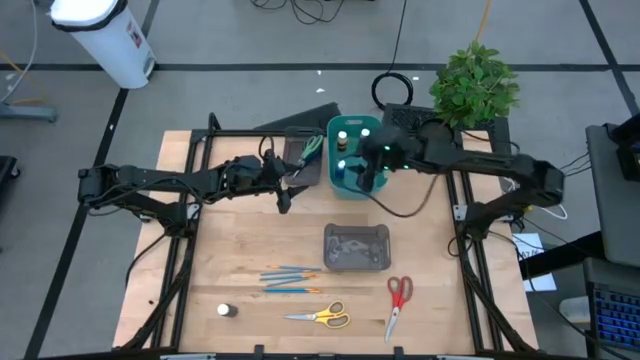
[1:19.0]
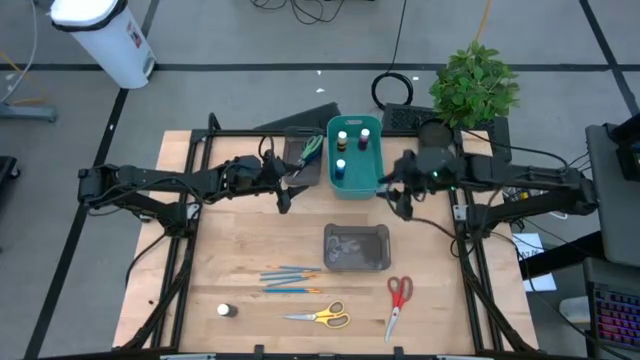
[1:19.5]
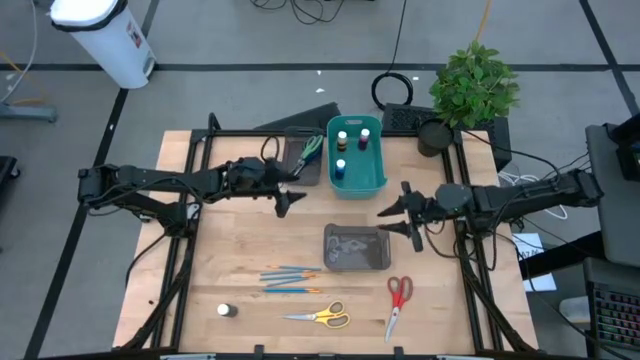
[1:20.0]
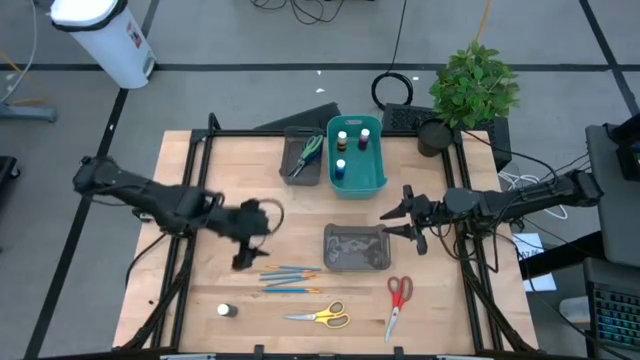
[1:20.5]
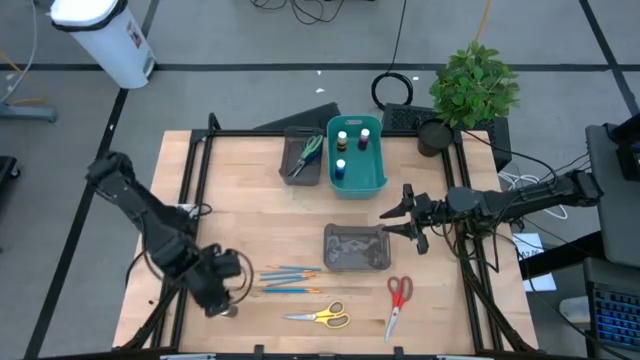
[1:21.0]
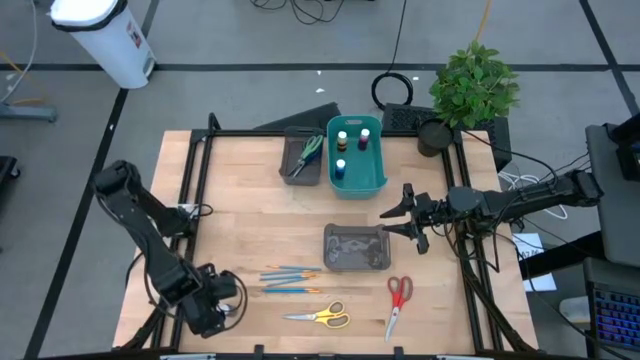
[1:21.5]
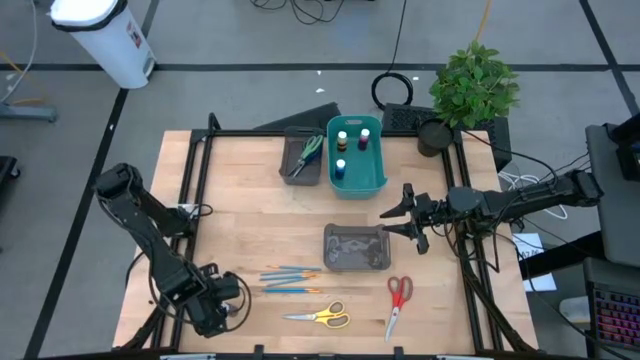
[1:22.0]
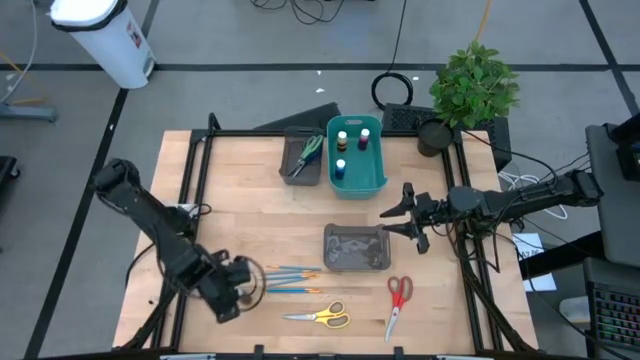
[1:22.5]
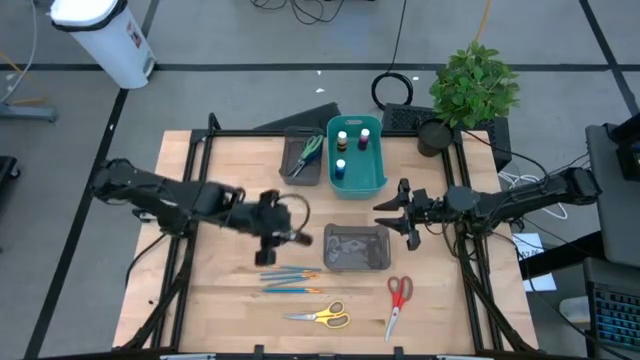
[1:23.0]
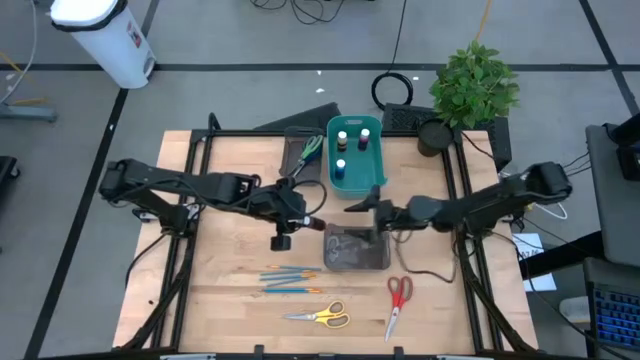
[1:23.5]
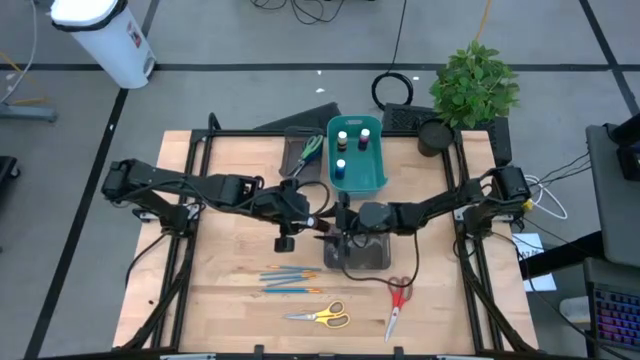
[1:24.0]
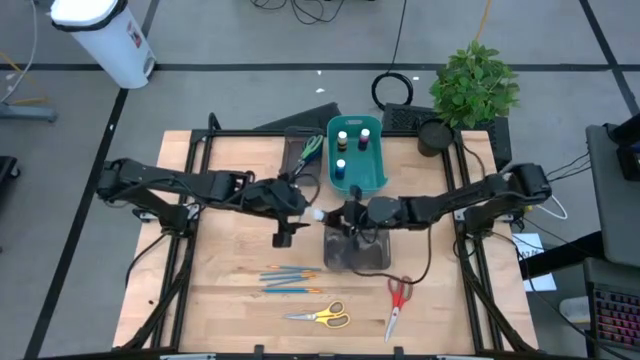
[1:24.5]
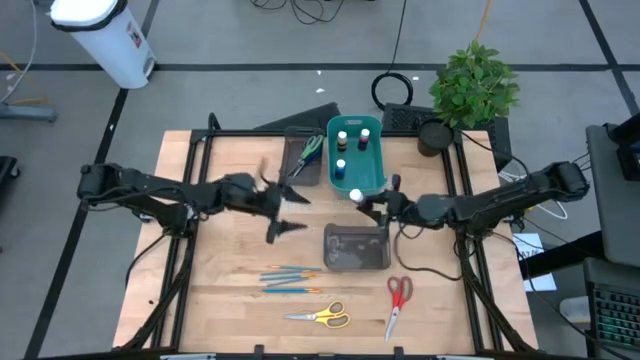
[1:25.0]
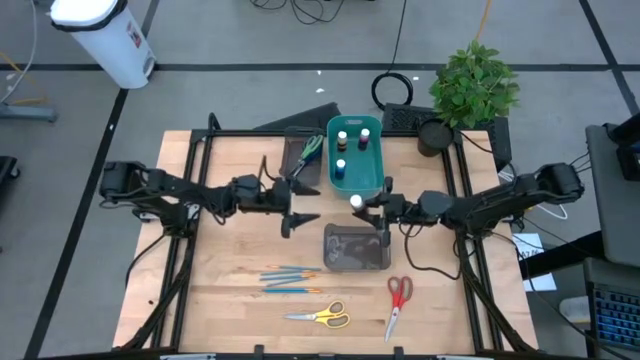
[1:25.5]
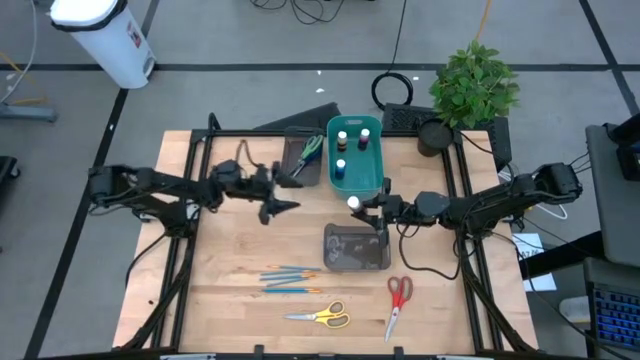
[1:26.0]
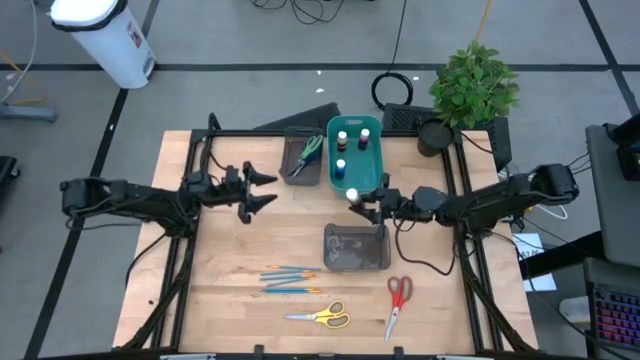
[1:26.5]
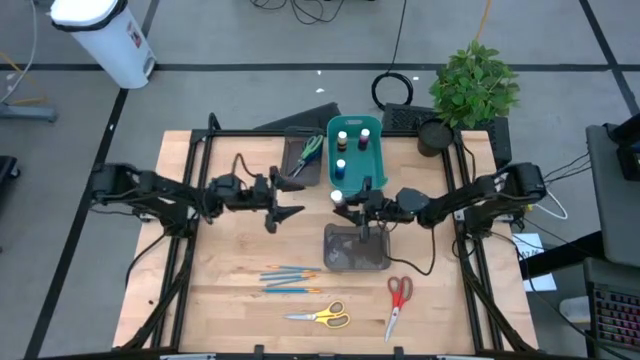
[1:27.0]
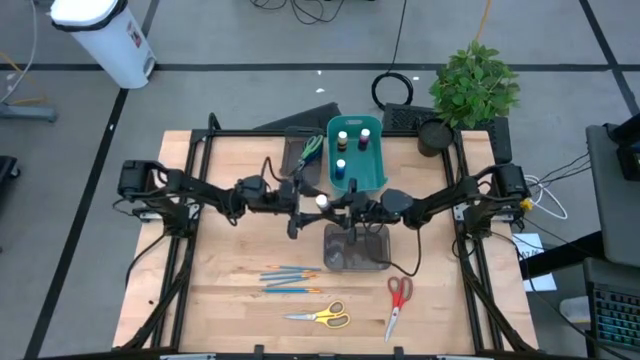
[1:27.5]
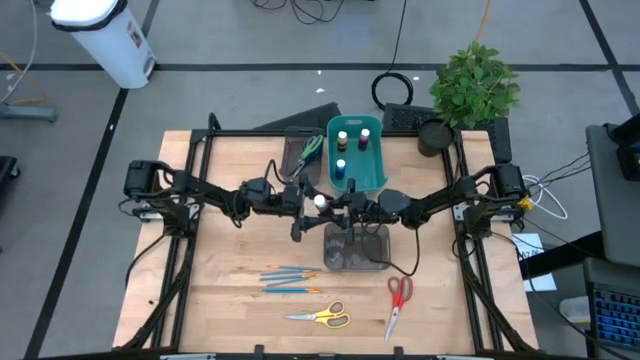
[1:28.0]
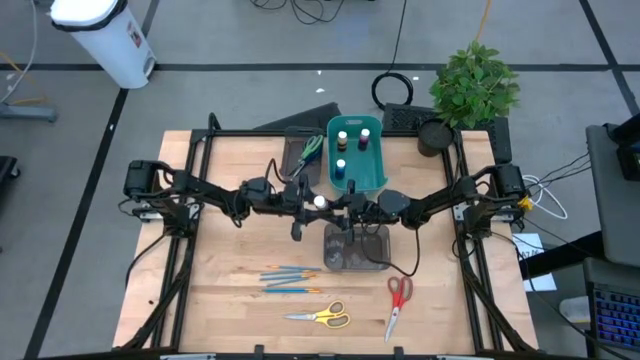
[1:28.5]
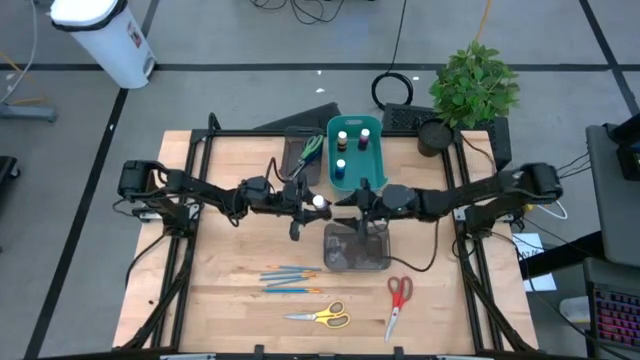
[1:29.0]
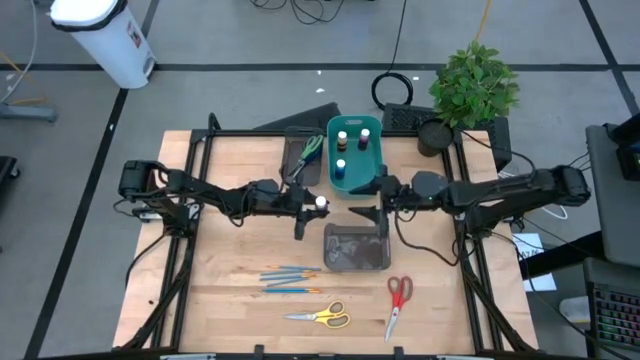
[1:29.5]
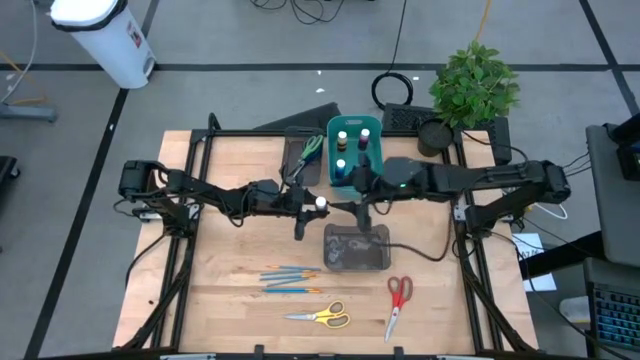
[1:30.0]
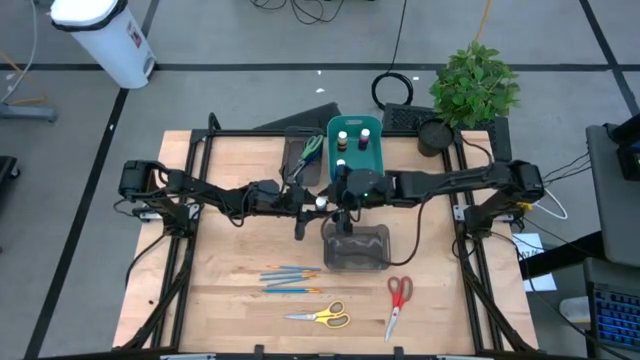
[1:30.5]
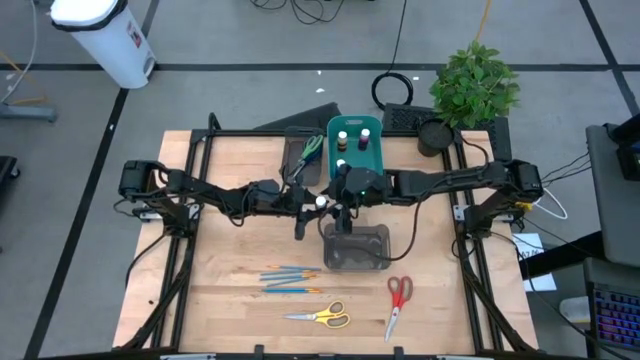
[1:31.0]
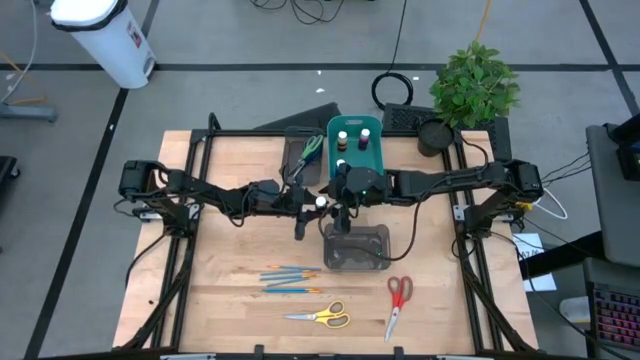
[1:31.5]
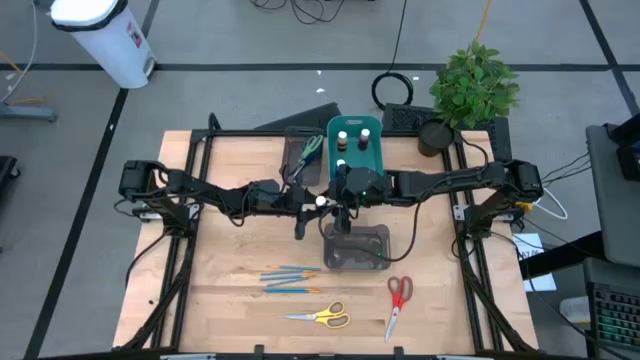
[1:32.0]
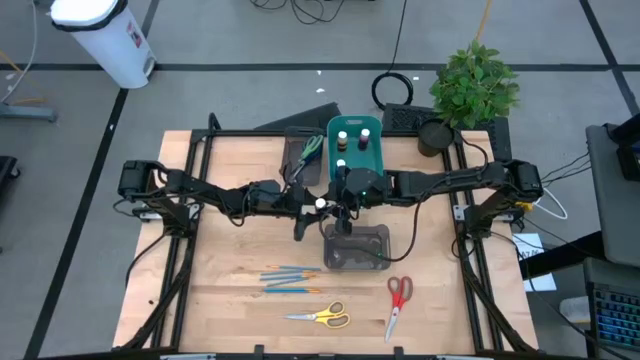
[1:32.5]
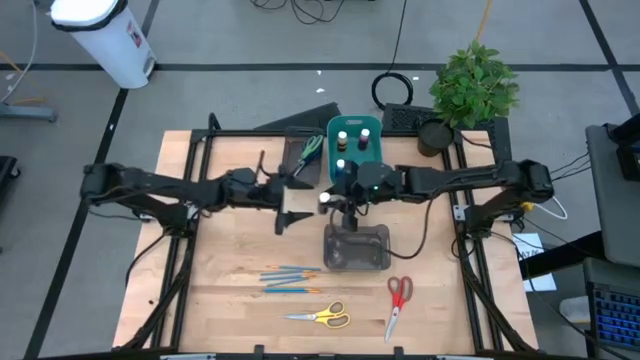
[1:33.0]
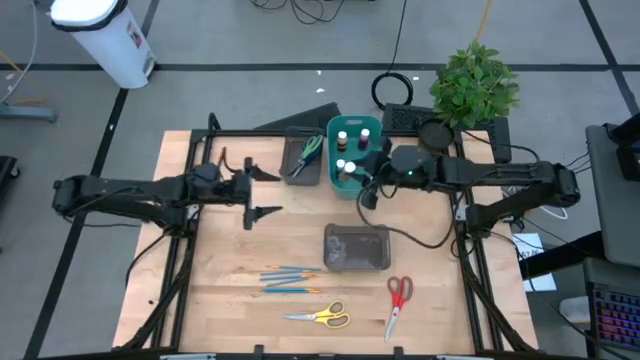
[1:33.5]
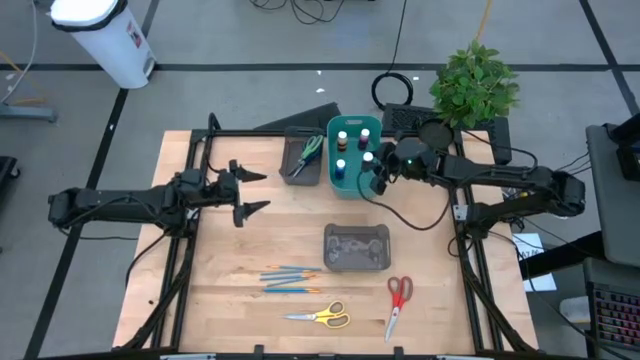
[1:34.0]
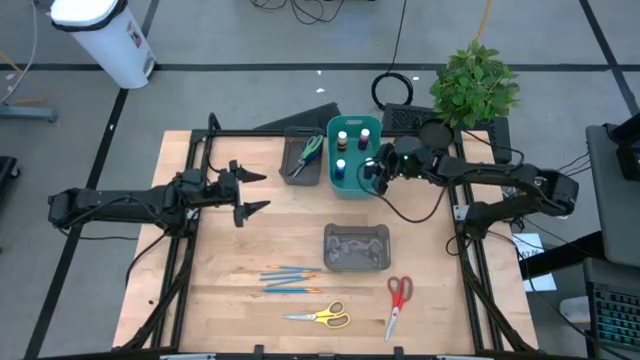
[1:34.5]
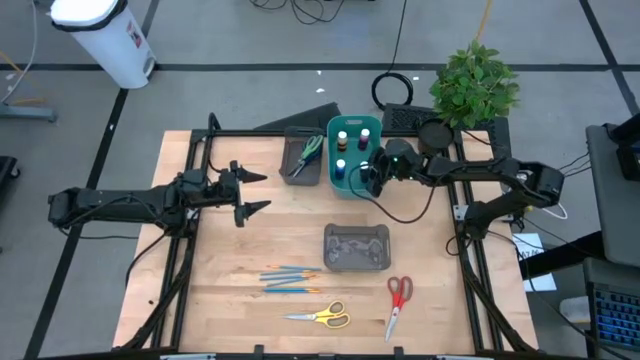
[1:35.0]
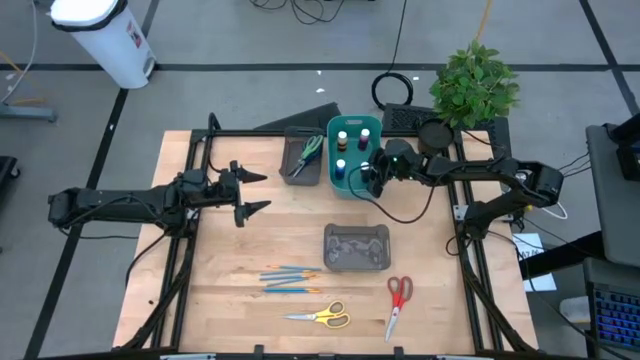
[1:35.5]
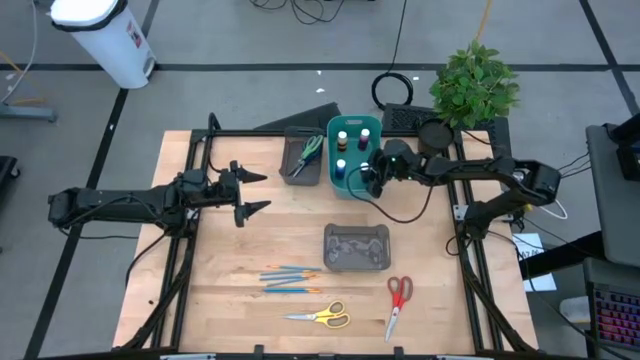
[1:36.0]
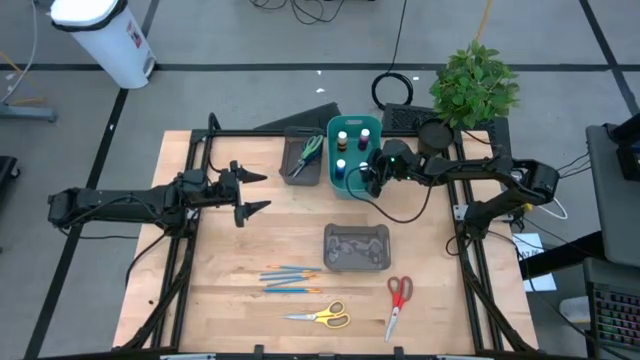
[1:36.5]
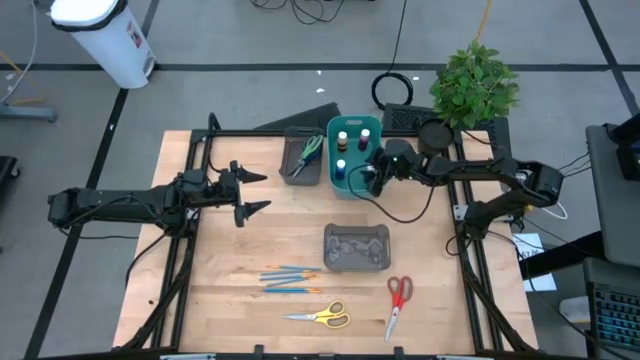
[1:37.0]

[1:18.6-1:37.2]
Task: Pick & Place Paint Supplies
Put the brown paint bottle into the green bin

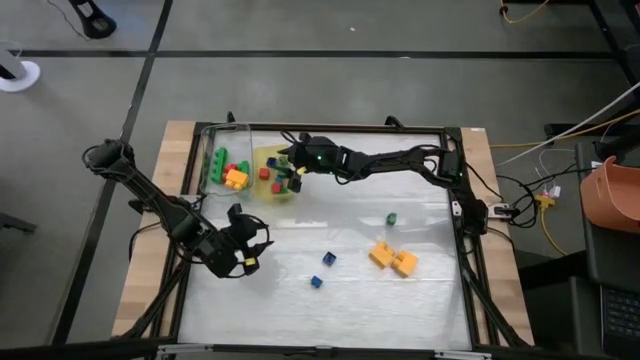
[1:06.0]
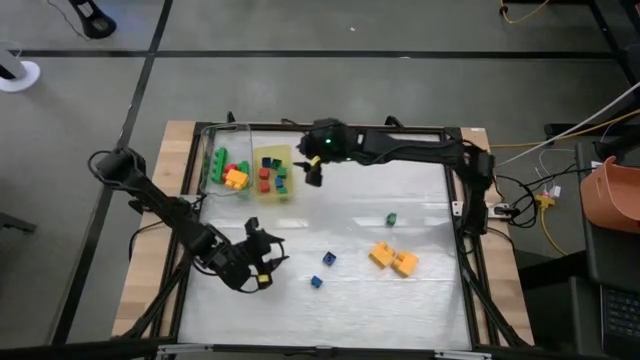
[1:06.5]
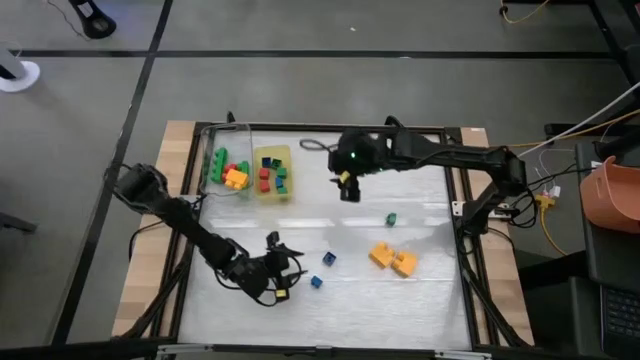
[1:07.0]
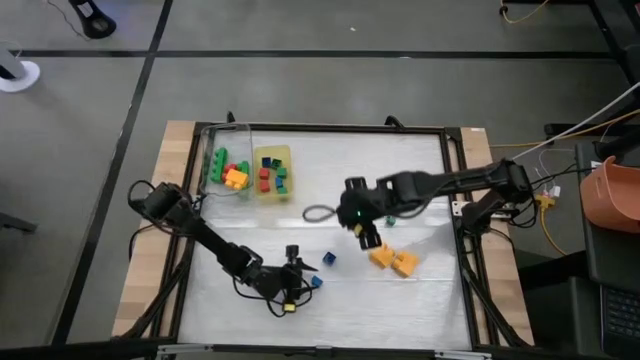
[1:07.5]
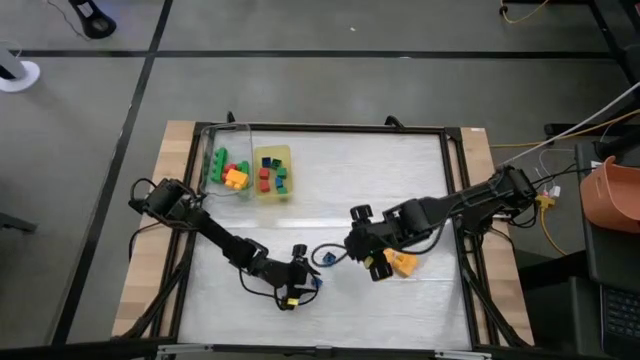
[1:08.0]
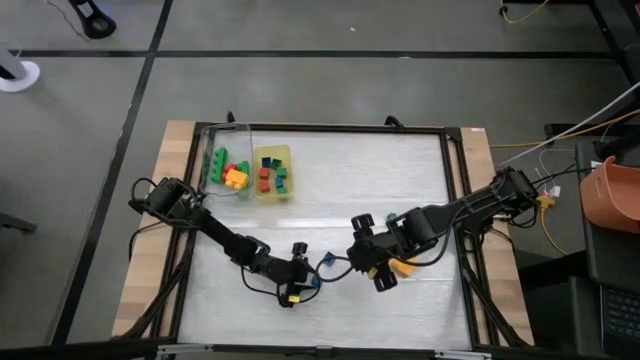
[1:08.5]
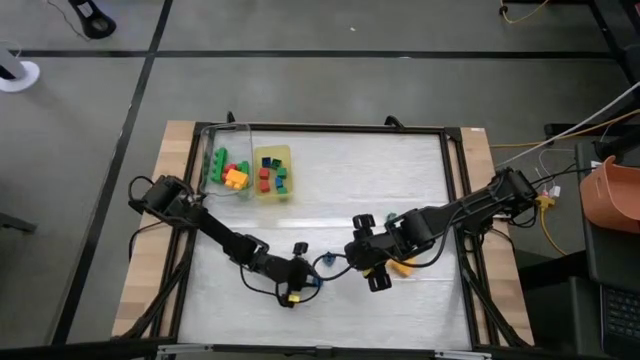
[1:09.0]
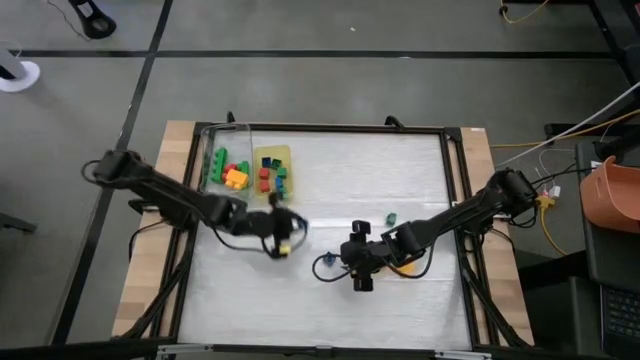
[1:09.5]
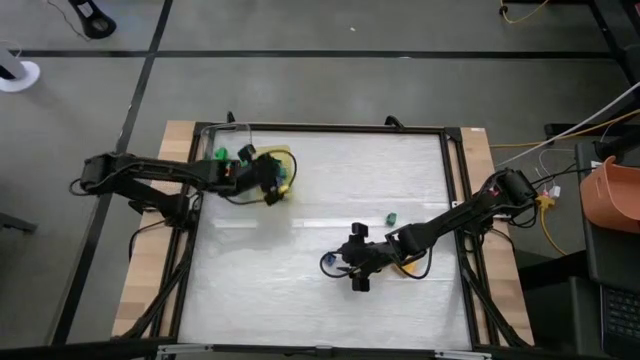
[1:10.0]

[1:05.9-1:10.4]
Task: Sort blocks by size
Put the small blue game piece into the yellow bin
